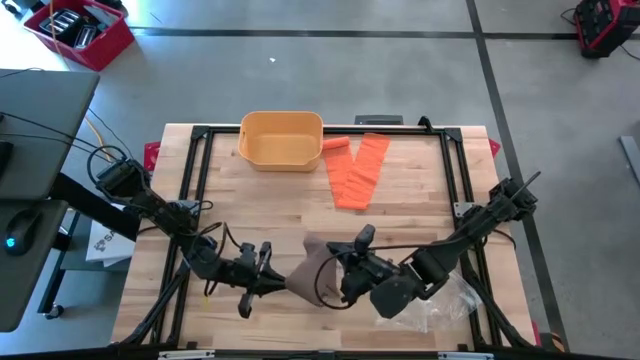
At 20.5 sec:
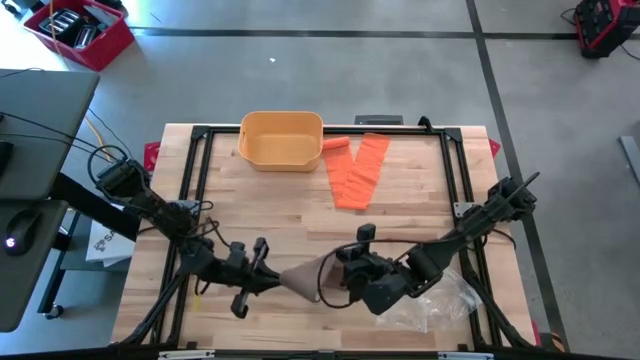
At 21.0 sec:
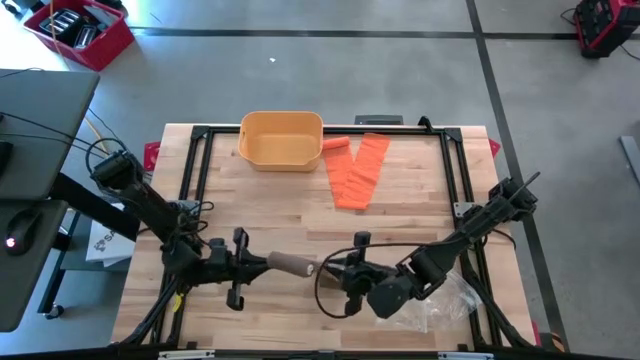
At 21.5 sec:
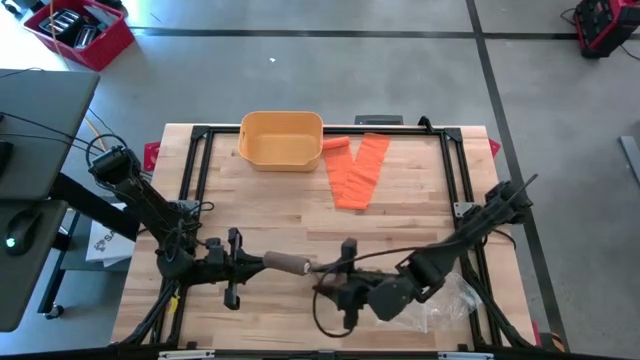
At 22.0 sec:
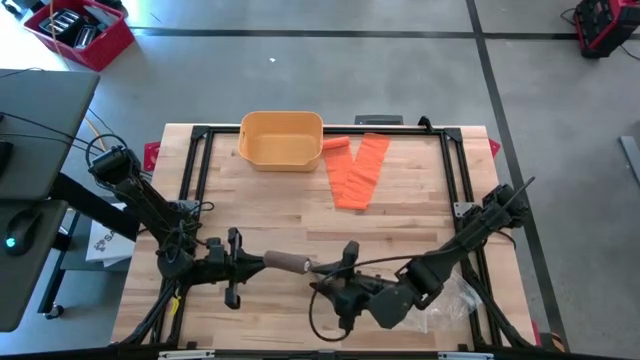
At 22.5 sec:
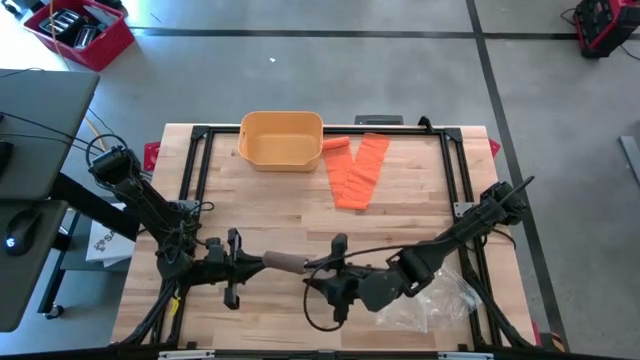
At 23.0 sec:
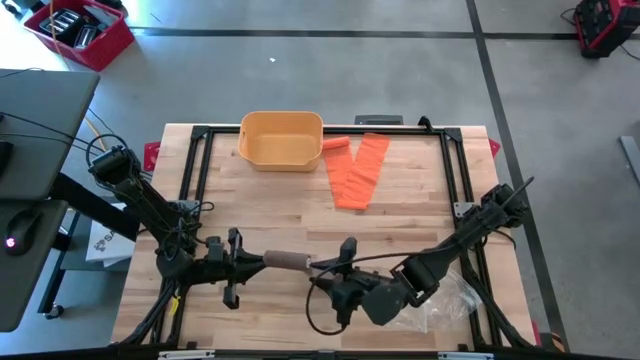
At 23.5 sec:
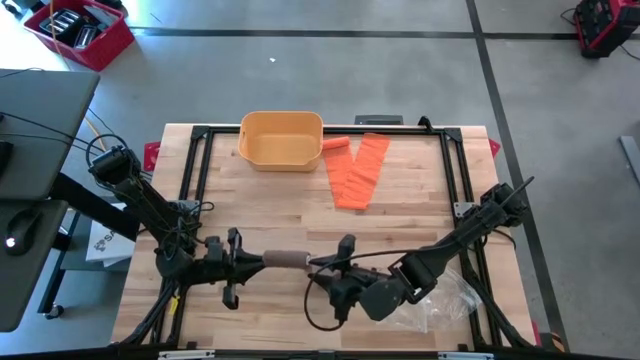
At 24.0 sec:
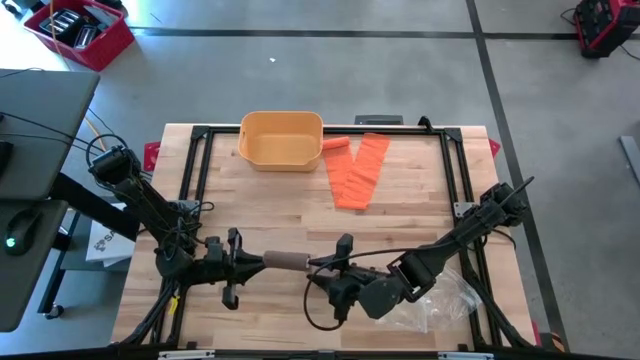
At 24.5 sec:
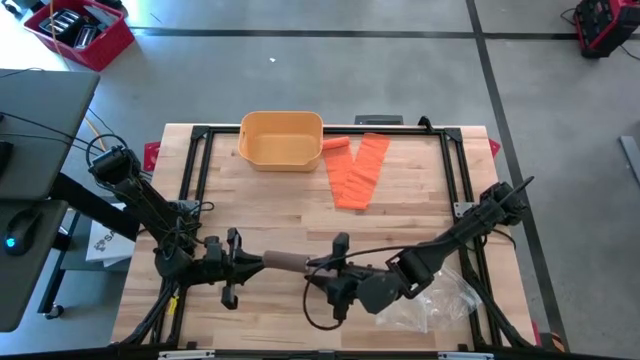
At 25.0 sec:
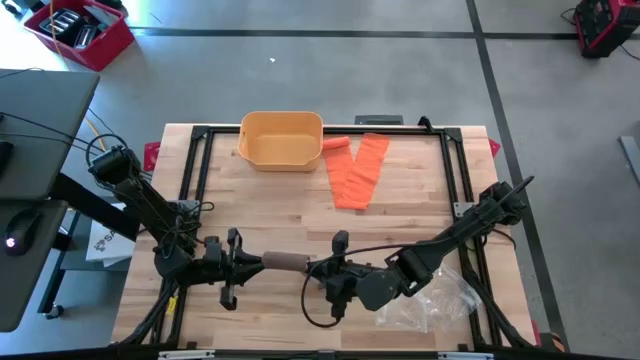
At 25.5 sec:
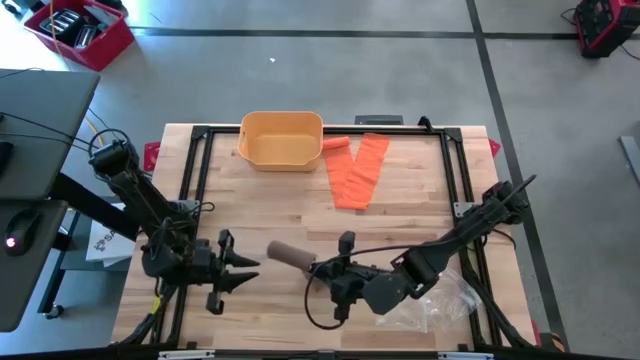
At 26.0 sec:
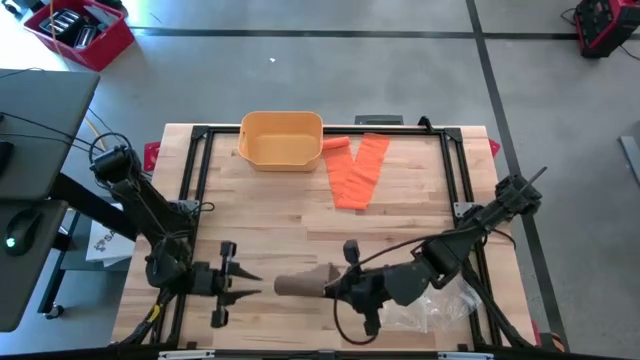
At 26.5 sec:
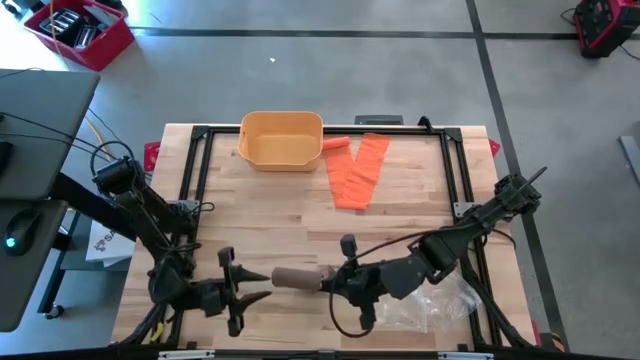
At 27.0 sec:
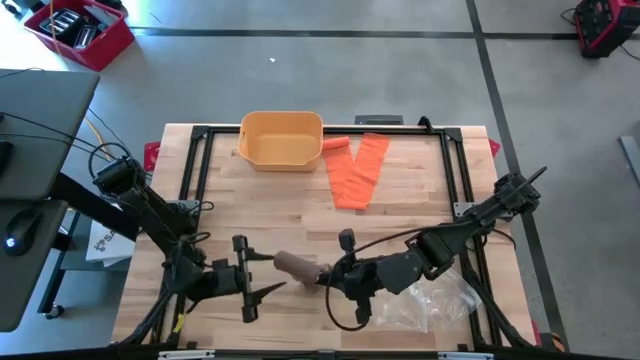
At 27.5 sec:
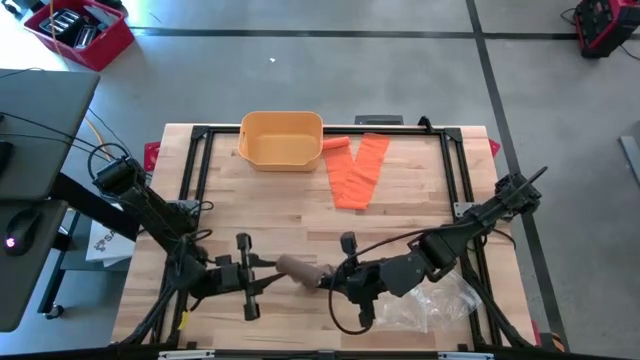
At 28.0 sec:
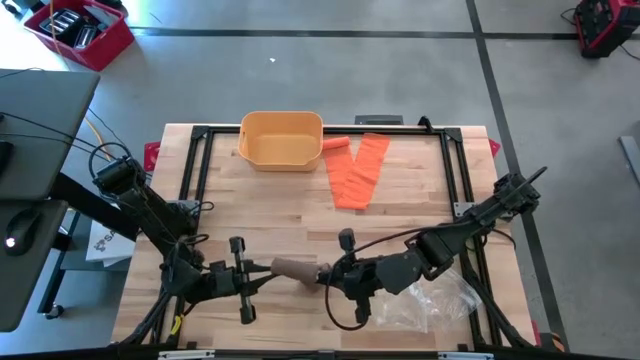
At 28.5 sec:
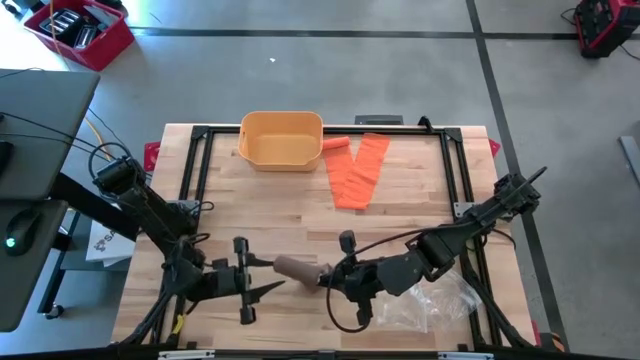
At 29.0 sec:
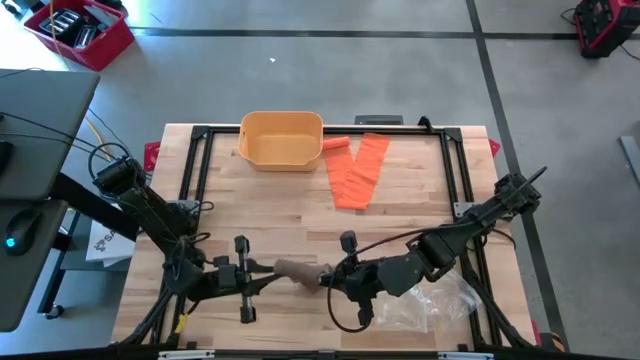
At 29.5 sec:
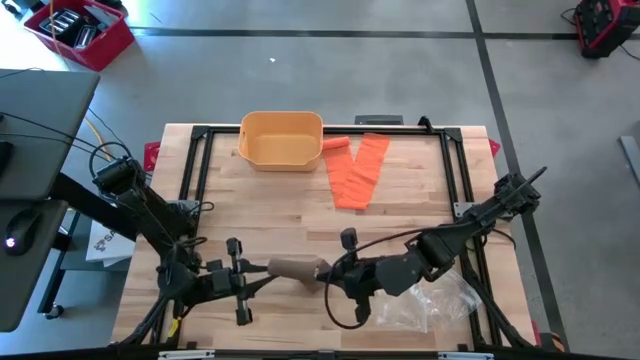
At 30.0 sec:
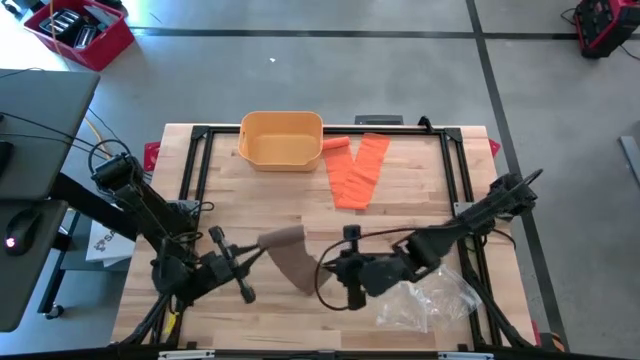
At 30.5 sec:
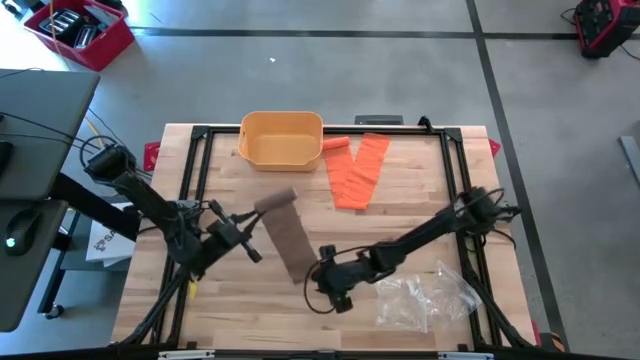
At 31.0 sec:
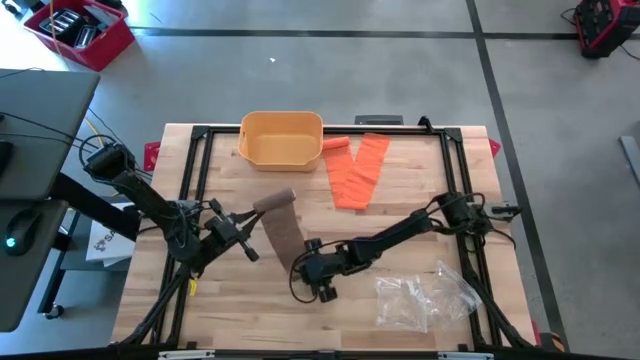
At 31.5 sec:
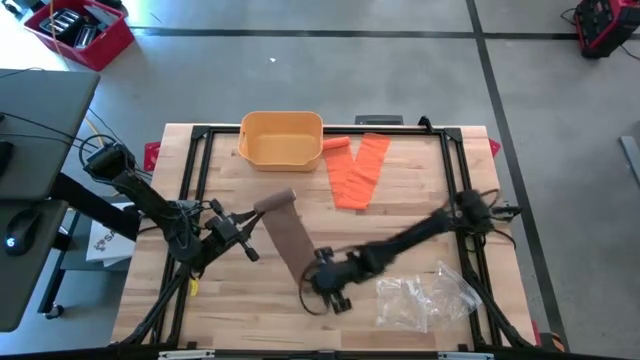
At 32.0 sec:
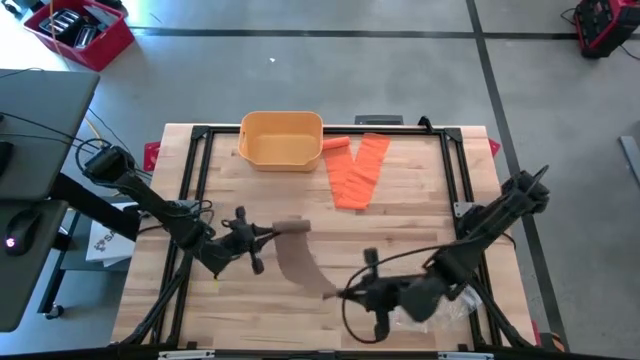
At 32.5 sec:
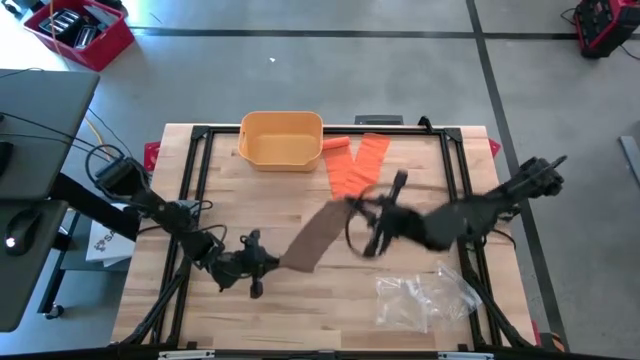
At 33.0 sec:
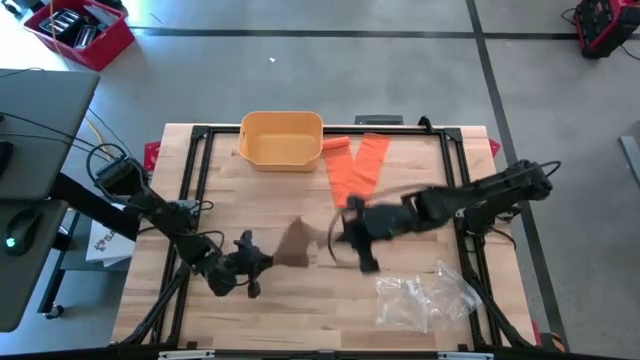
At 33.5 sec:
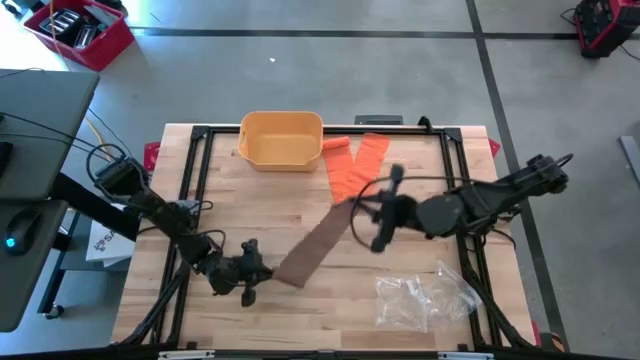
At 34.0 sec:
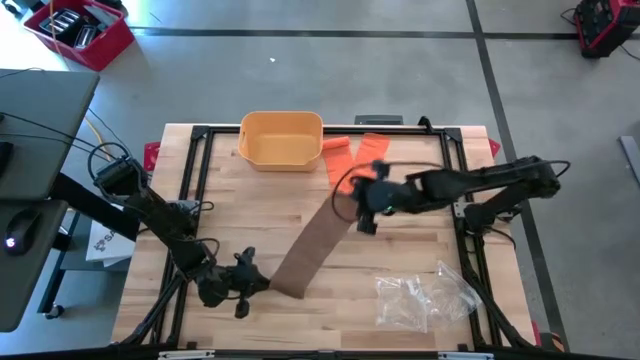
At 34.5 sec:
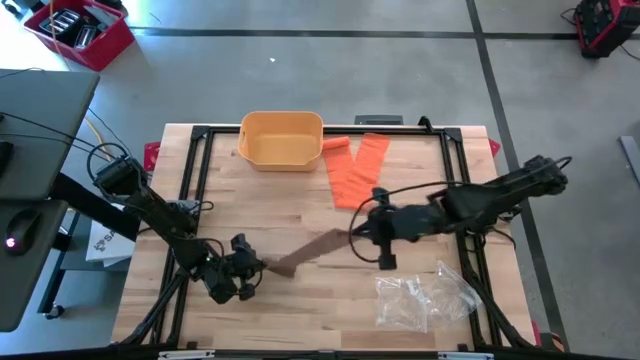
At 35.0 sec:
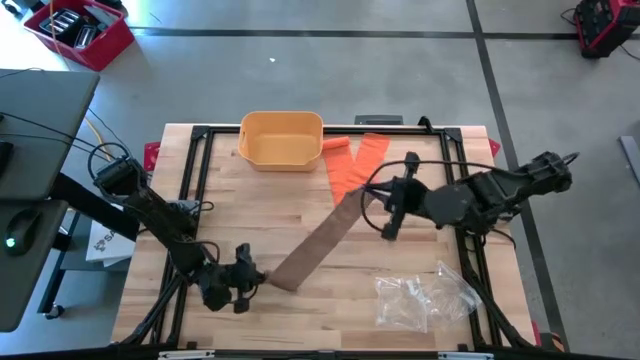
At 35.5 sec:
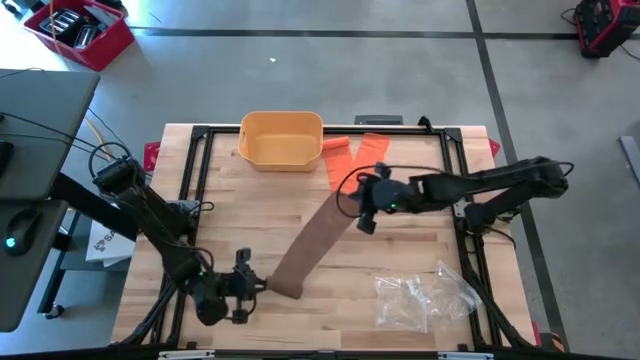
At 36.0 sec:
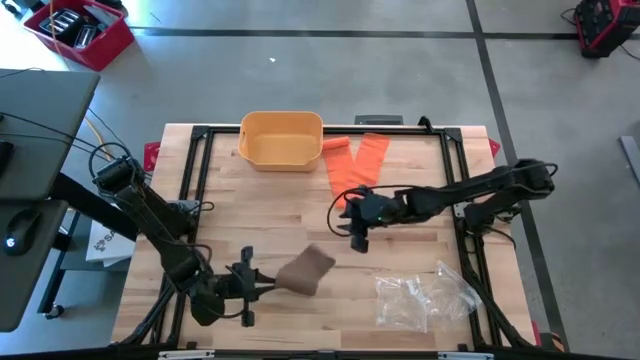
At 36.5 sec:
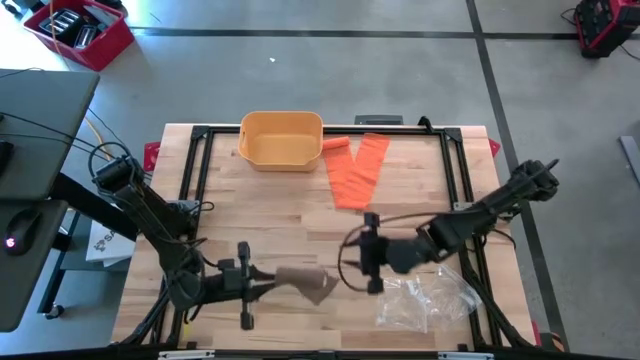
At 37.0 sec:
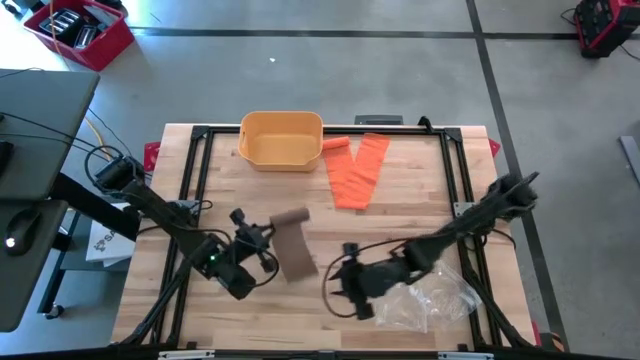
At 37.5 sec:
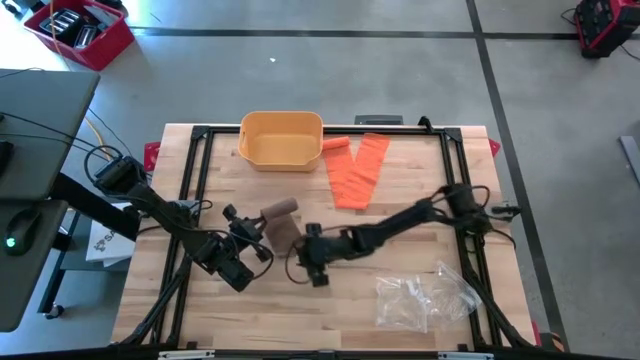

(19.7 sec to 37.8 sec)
Task: Roll bandage
Roll the brown bandage
